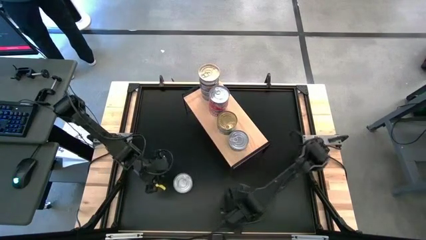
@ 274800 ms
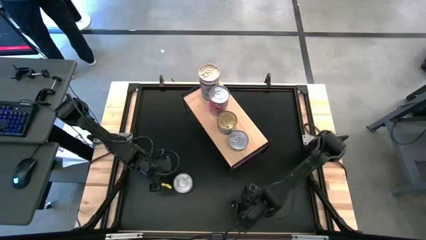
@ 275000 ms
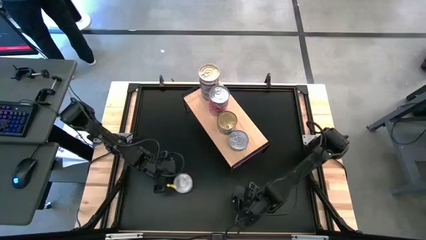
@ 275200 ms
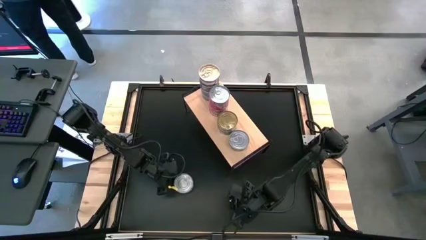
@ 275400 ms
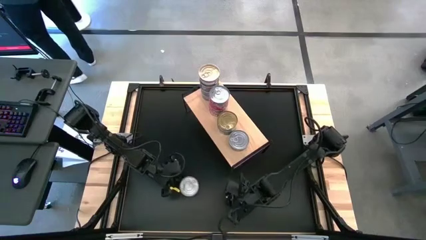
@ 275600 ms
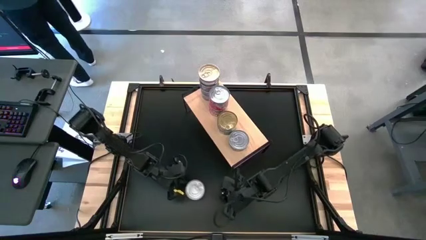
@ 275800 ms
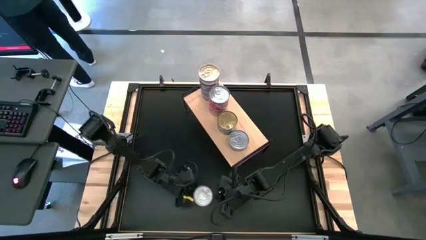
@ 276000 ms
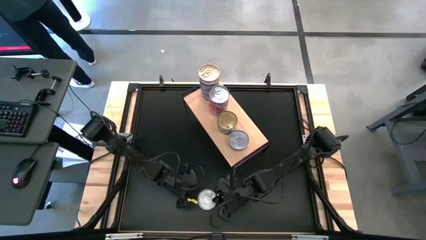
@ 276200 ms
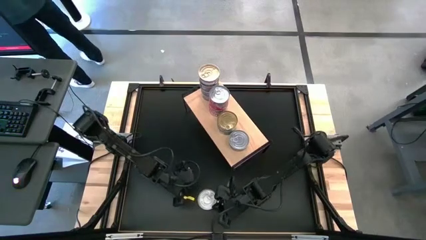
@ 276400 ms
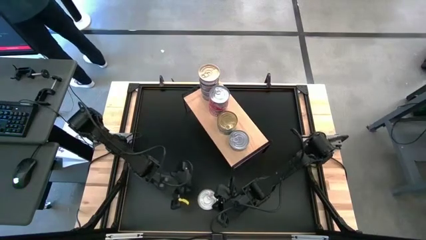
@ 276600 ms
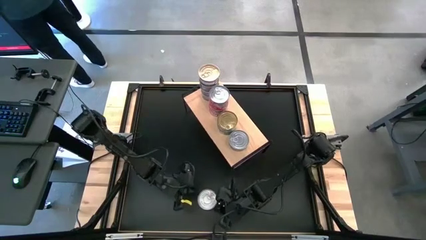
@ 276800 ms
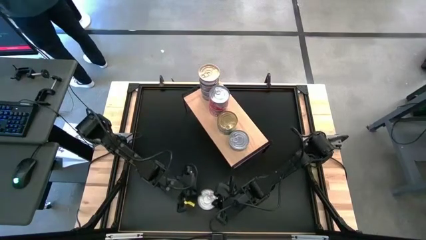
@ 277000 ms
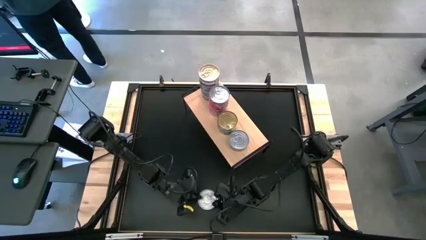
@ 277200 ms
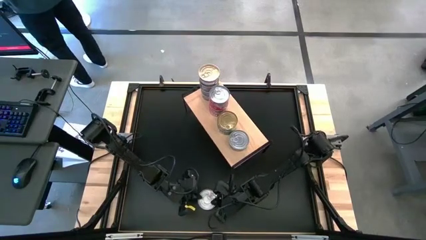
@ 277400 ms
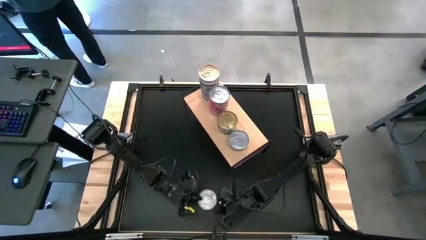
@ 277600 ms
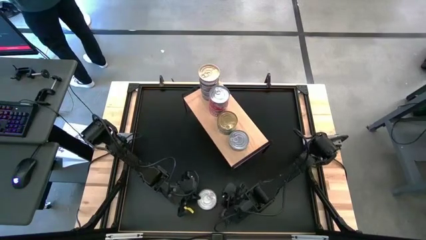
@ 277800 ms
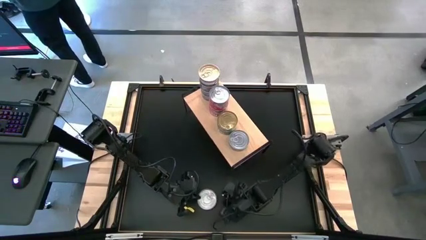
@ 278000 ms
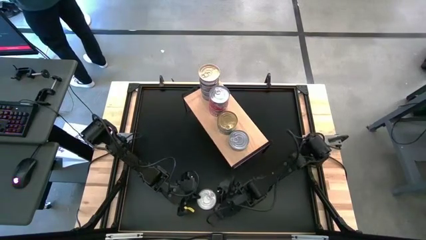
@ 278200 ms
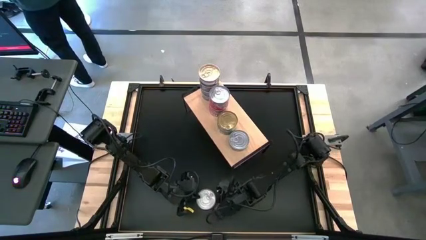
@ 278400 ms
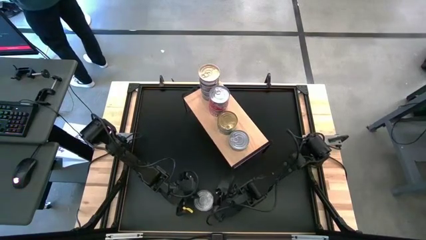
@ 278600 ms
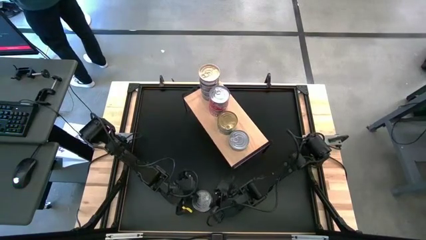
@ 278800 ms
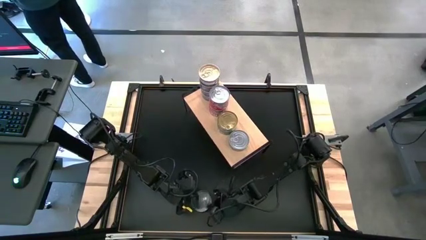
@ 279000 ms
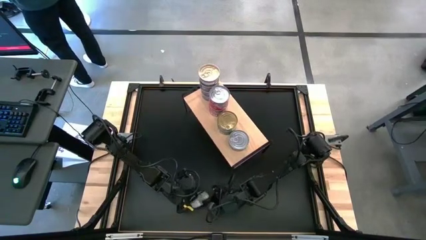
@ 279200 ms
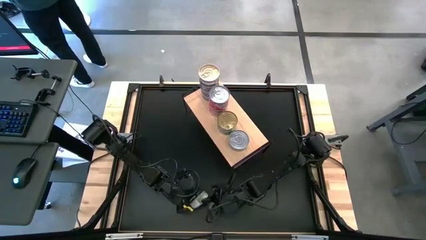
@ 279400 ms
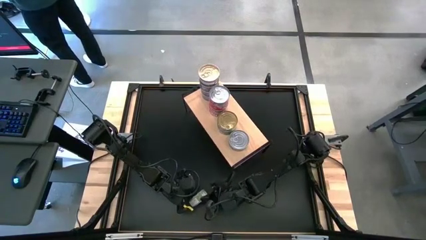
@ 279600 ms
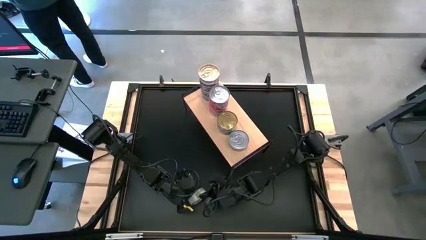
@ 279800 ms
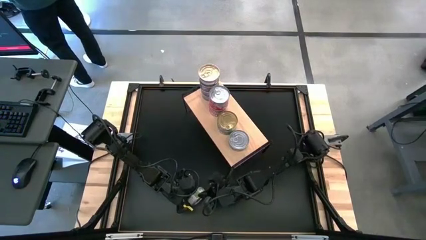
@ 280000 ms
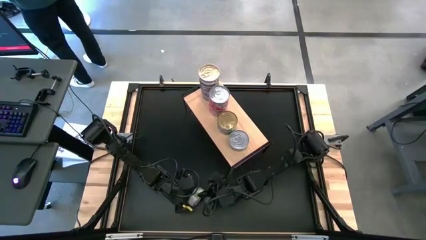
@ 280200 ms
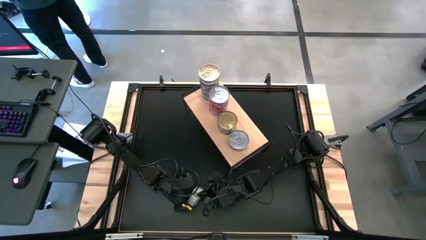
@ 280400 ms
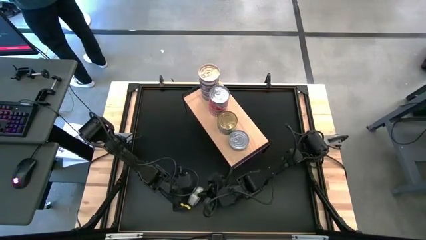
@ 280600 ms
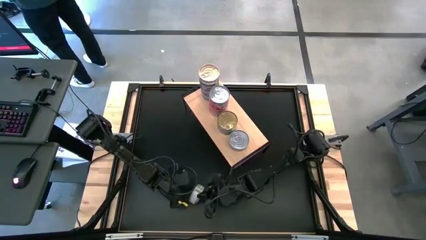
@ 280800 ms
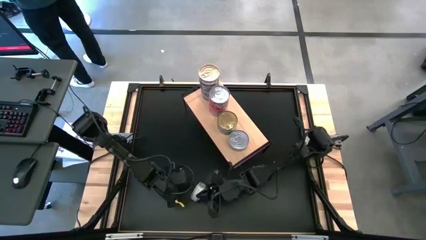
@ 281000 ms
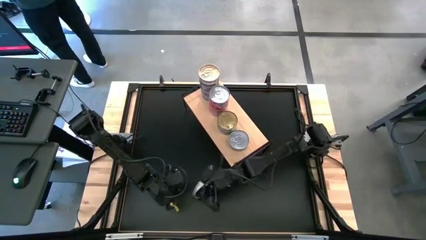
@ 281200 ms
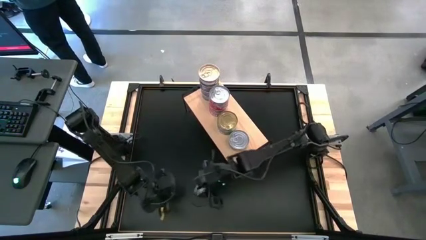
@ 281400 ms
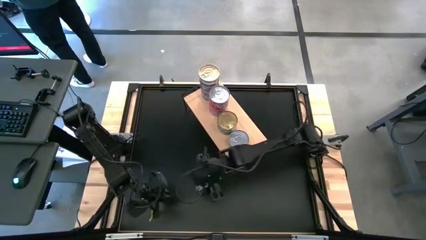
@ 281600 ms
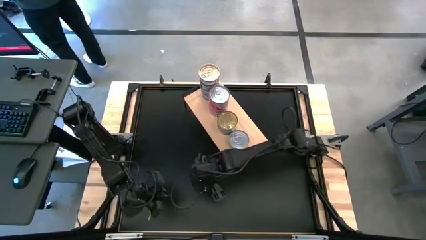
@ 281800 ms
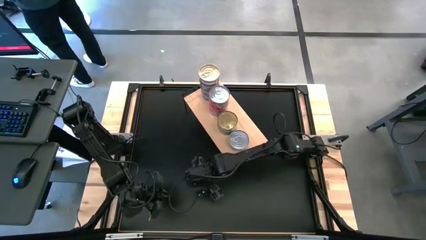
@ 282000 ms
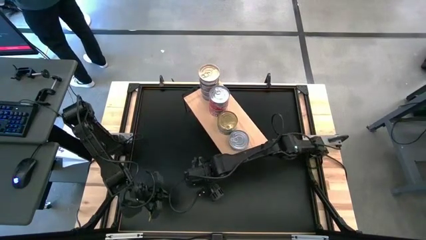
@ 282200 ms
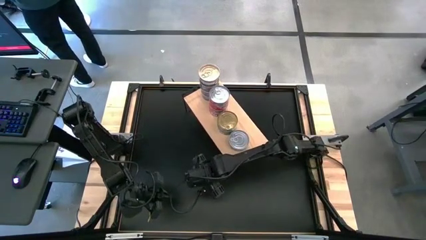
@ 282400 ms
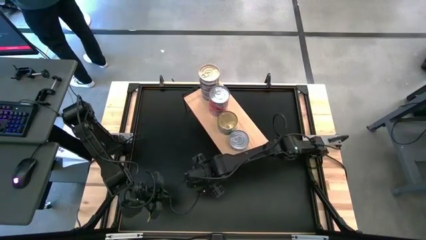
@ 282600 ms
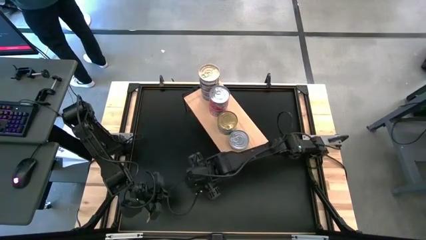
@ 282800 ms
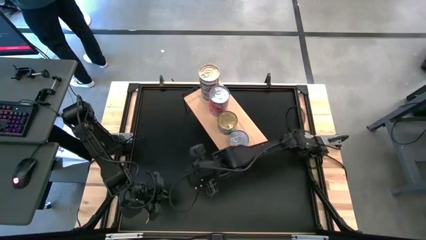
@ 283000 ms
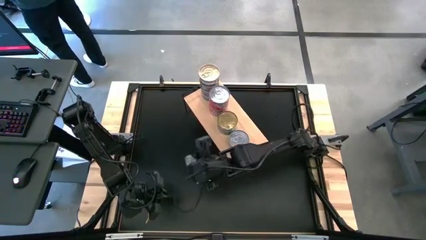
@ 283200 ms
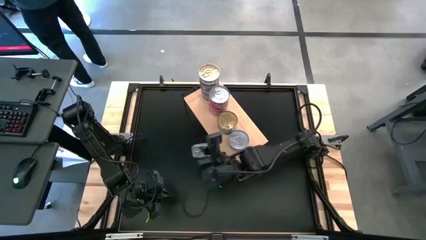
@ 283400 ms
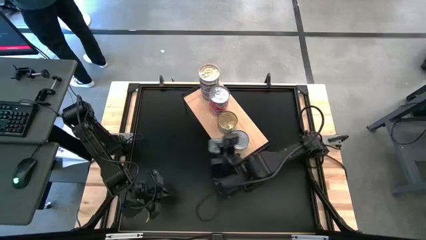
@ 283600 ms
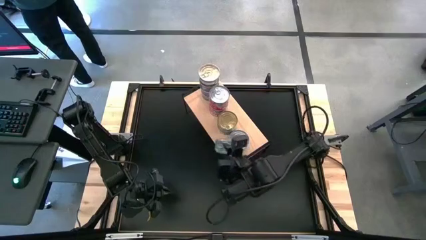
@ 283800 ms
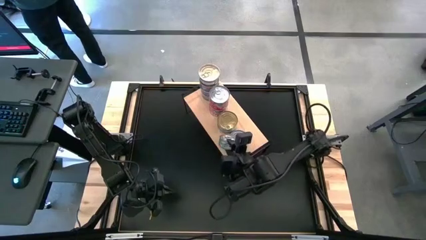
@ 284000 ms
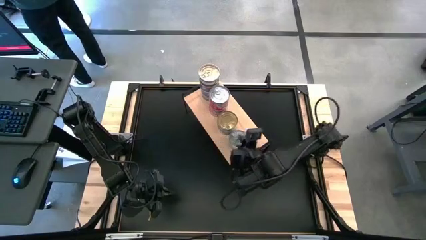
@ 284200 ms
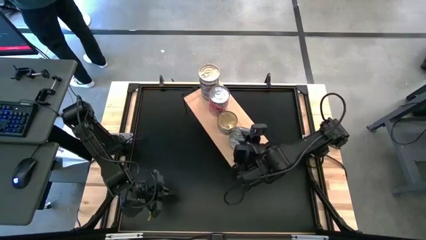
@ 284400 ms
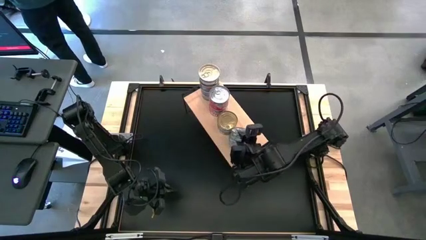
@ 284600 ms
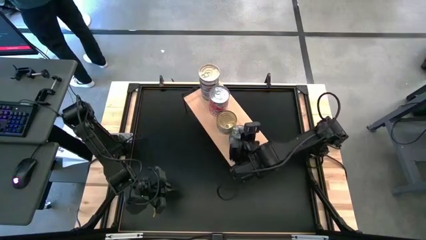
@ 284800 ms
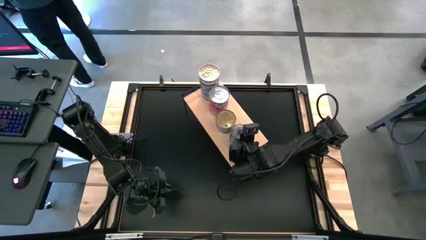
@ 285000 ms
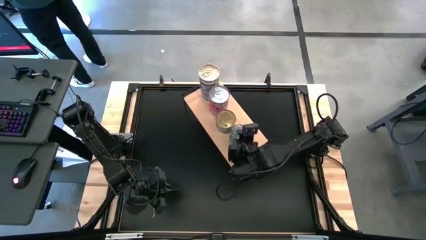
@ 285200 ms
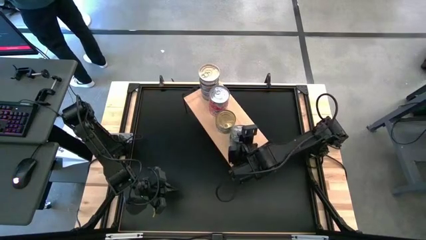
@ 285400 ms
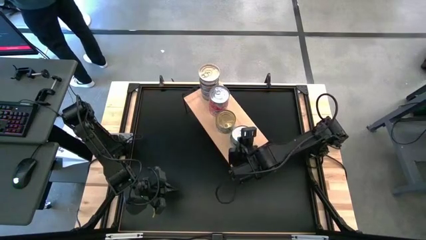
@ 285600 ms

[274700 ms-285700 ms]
Task: Stack canned seafood by type on shelf
Stack the green tuna can on top of the green tuna can on the shelf
